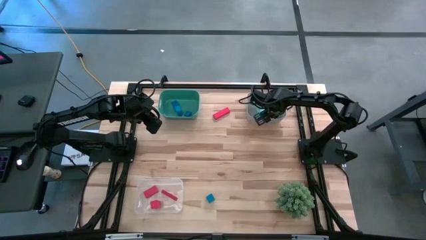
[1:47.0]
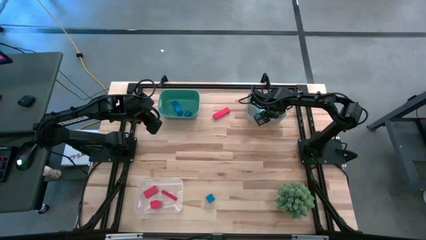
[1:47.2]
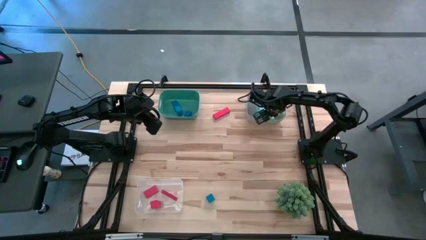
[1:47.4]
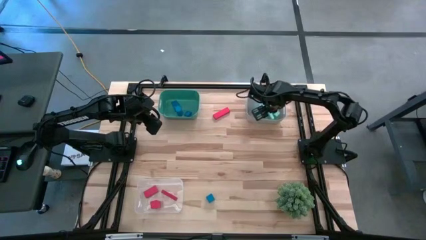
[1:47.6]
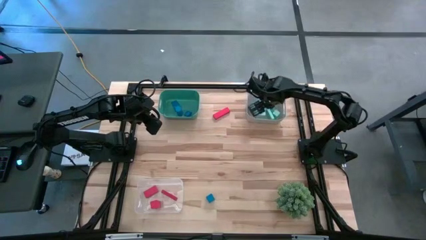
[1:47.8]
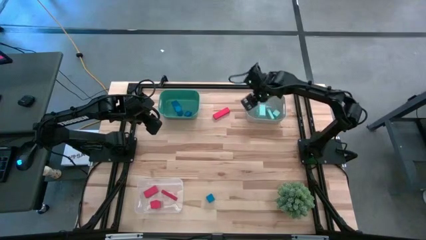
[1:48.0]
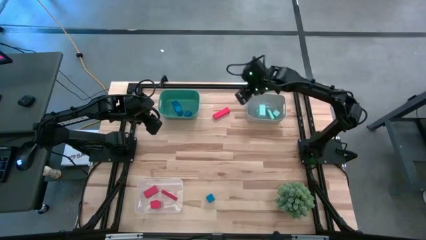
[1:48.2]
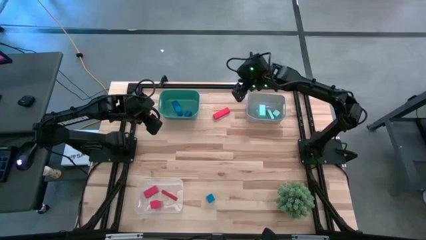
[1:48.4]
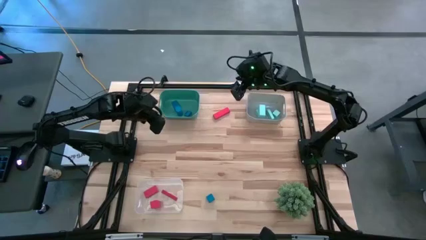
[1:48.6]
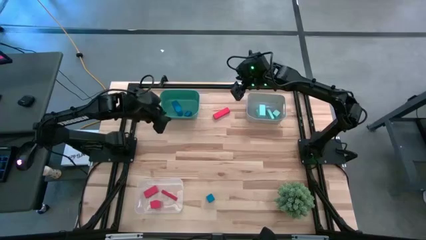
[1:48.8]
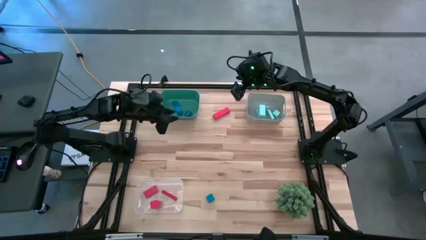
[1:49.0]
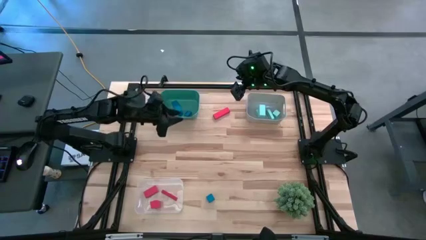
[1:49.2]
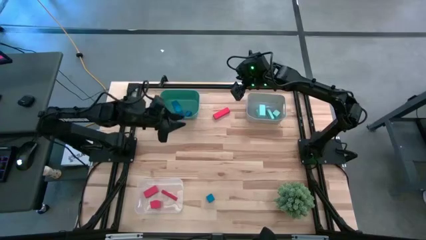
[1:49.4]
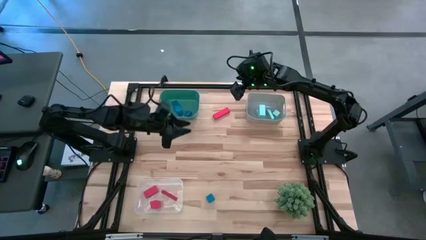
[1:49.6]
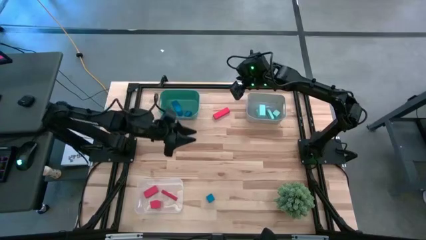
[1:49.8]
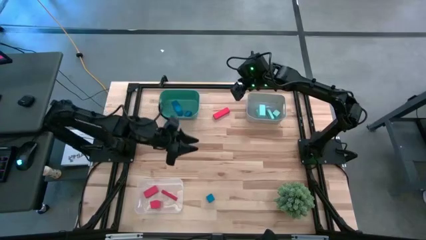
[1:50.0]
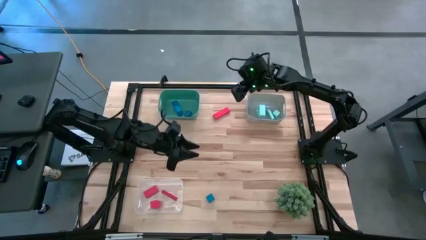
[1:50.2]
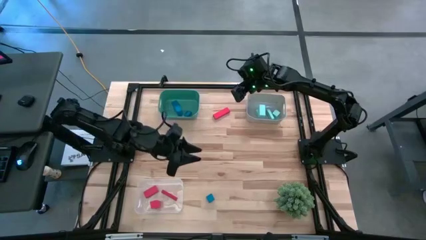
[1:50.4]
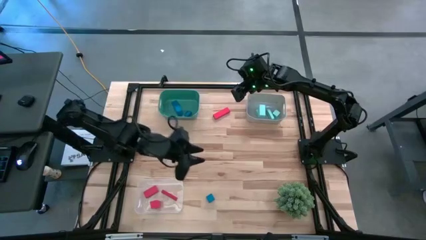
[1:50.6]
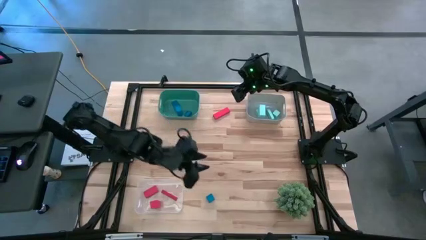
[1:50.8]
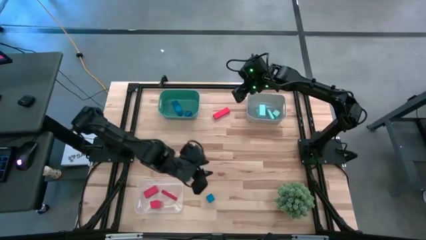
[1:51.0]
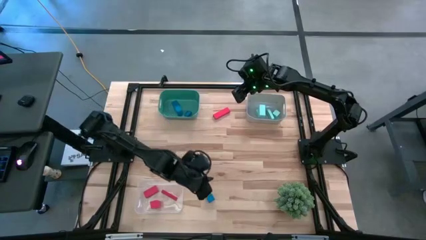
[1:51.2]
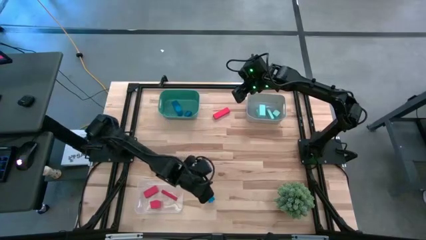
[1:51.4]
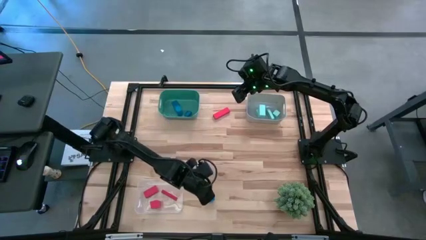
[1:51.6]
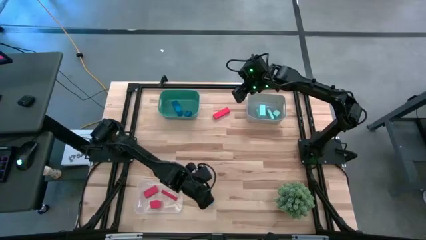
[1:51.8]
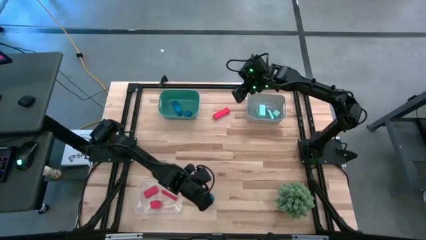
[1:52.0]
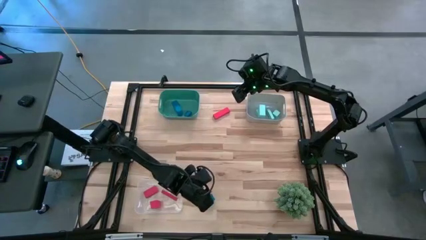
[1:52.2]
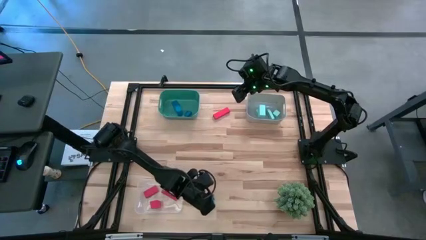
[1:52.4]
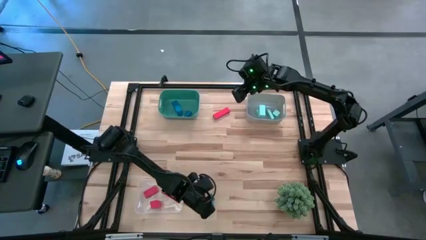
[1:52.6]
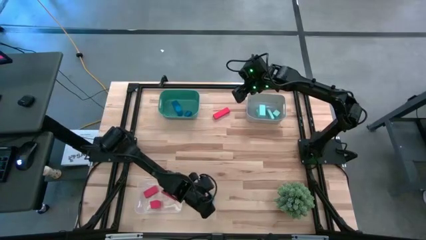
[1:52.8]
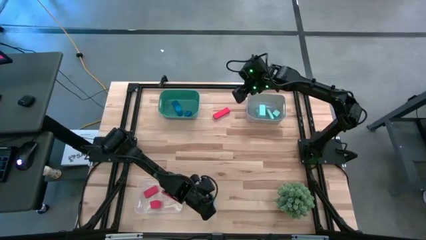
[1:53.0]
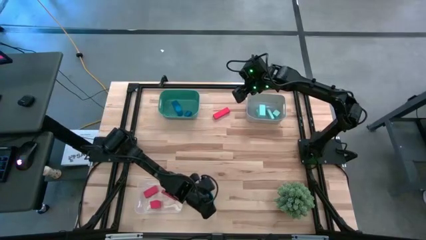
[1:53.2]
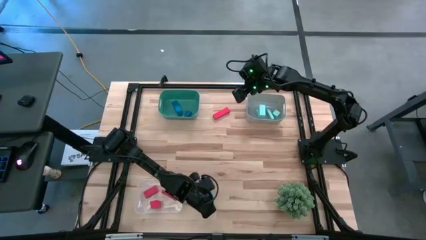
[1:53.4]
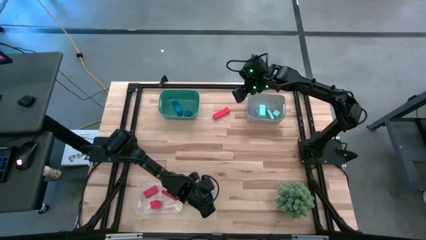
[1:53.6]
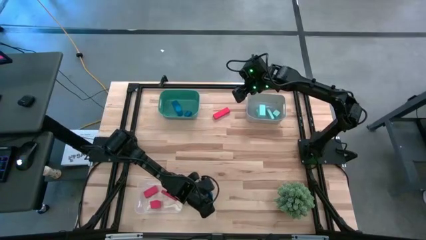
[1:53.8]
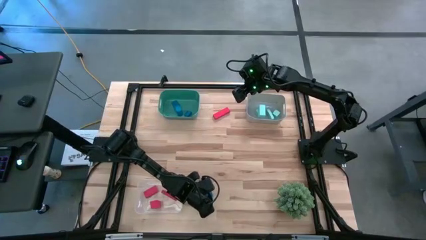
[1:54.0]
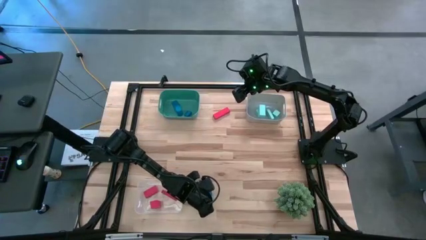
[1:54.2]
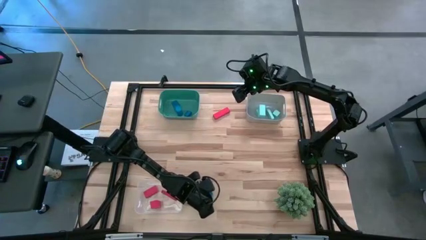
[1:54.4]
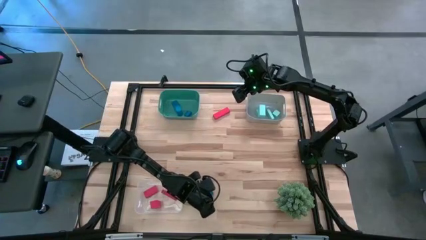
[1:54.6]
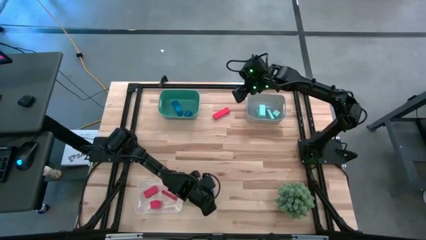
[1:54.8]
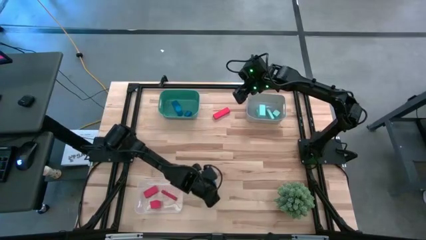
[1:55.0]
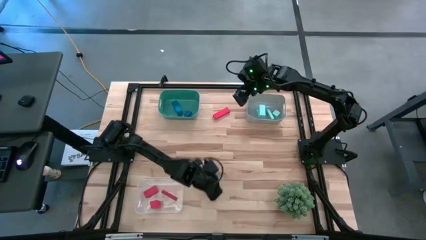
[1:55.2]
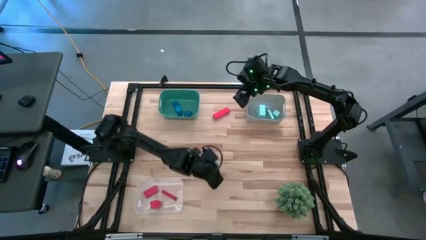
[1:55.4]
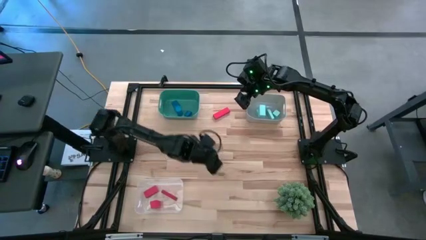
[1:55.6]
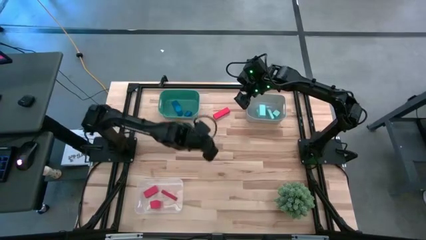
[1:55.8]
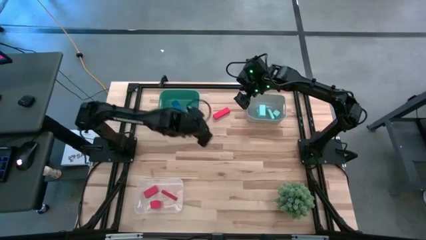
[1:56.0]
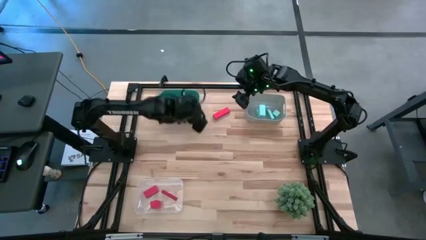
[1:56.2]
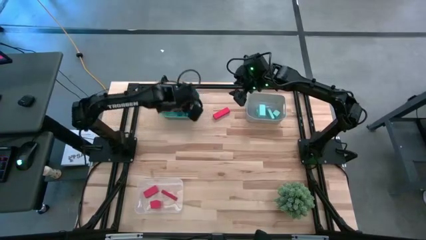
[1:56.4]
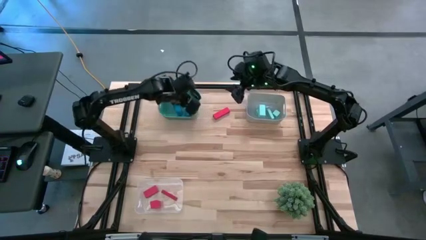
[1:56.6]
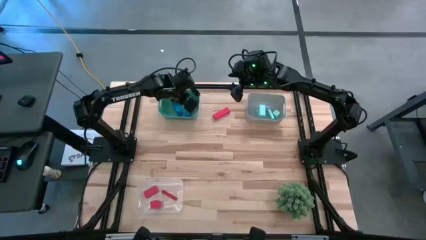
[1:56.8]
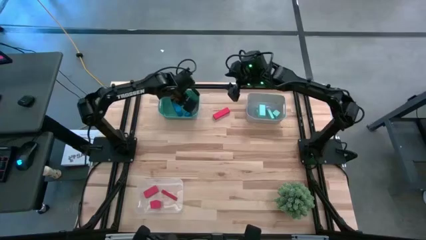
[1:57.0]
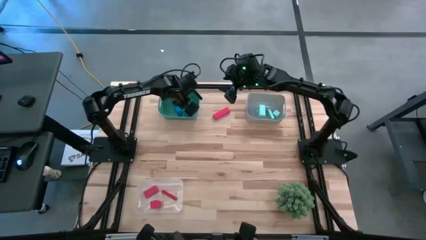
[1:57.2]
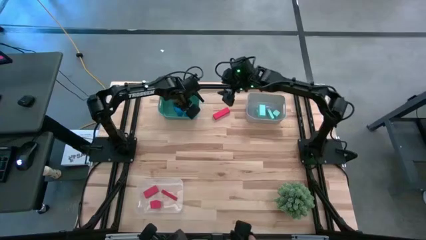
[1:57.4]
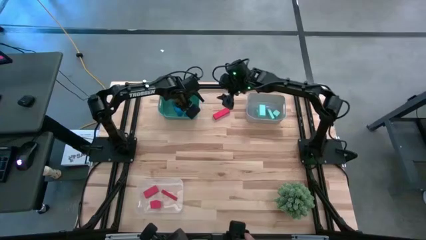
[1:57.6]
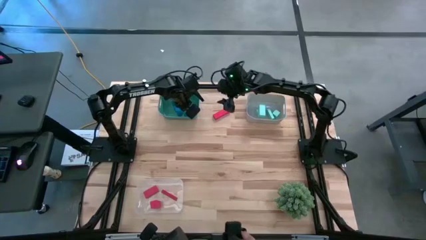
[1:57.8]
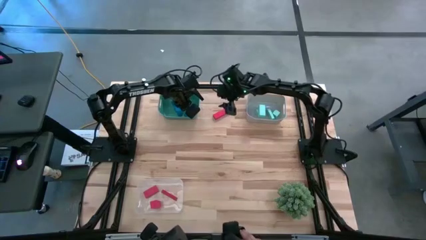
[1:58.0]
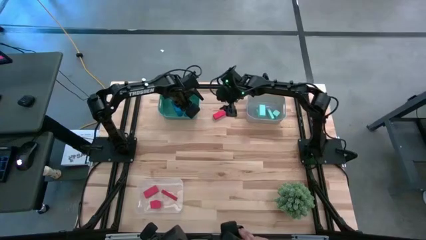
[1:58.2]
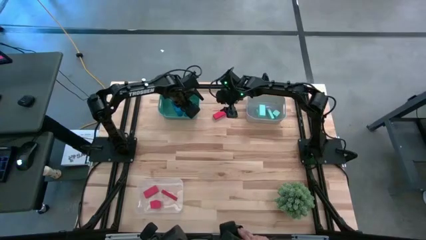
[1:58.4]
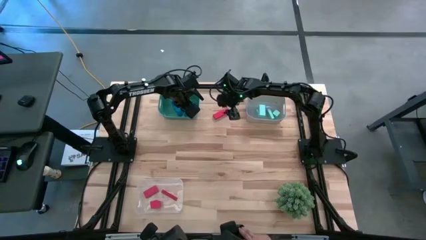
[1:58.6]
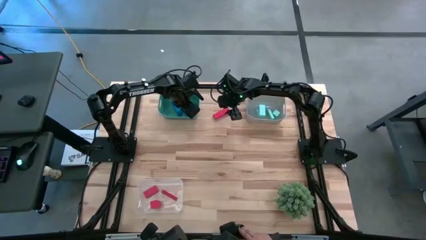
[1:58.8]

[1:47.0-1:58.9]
Task: Sort & place blocks by color
Put the blue block into the green bin
